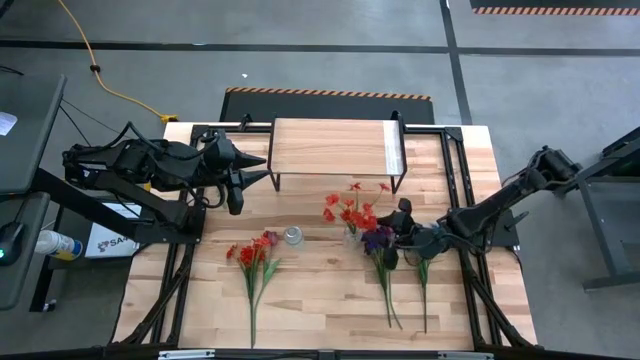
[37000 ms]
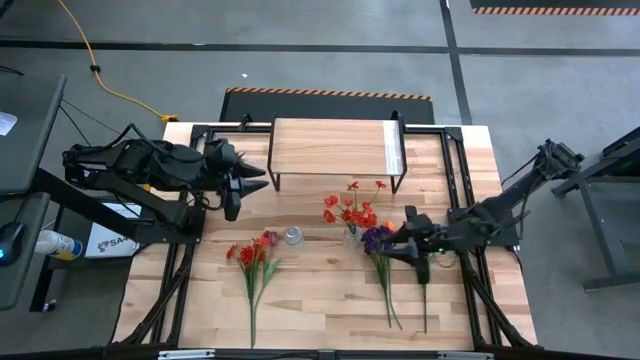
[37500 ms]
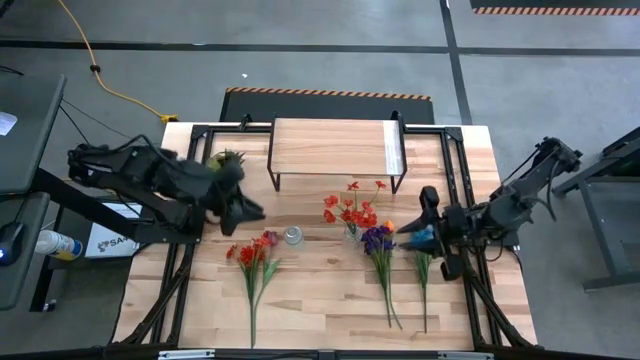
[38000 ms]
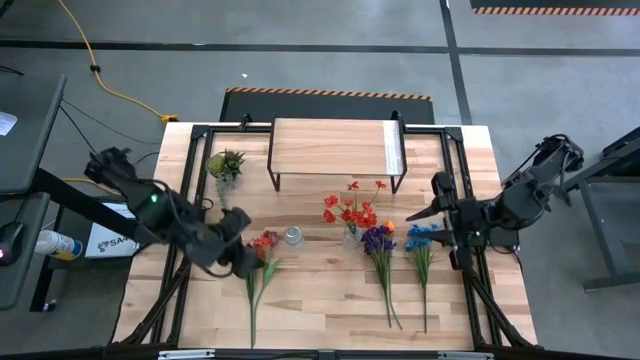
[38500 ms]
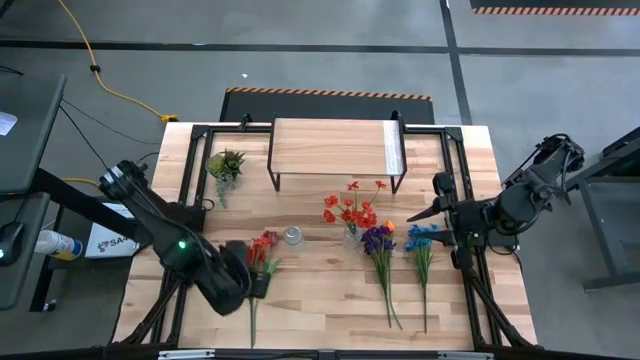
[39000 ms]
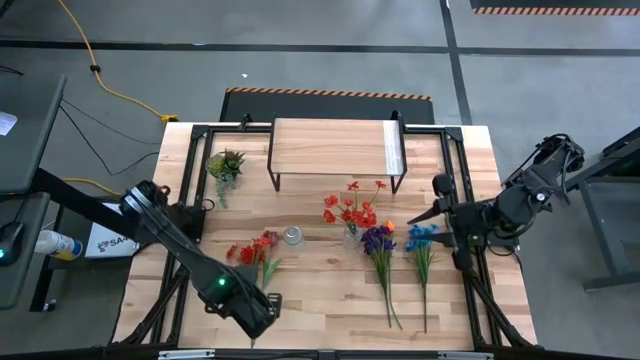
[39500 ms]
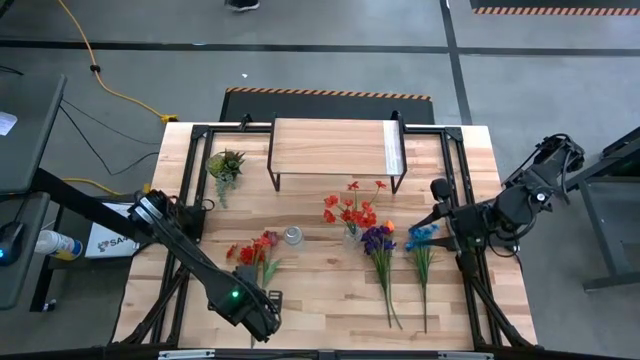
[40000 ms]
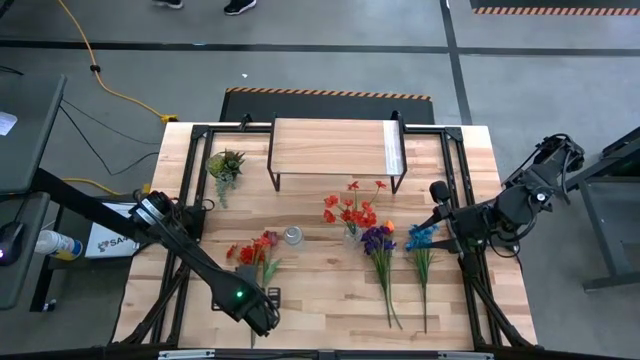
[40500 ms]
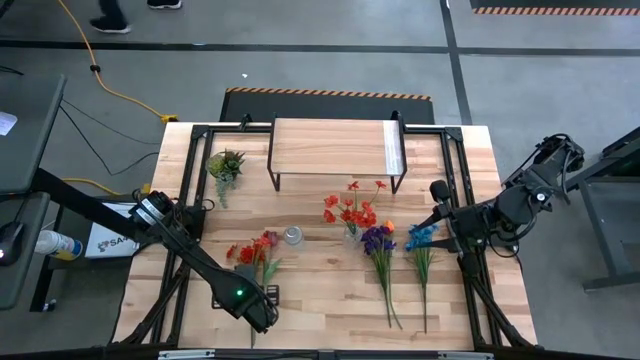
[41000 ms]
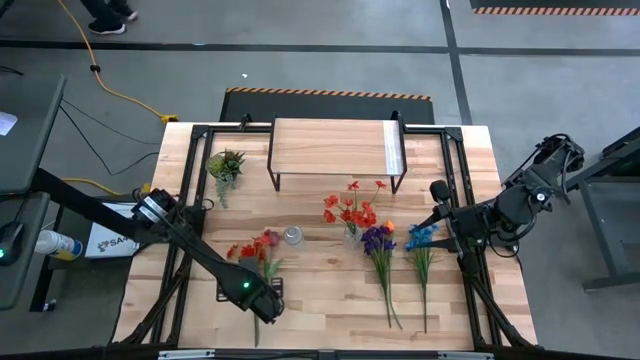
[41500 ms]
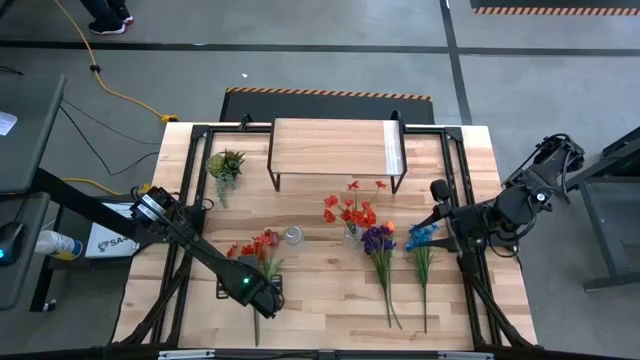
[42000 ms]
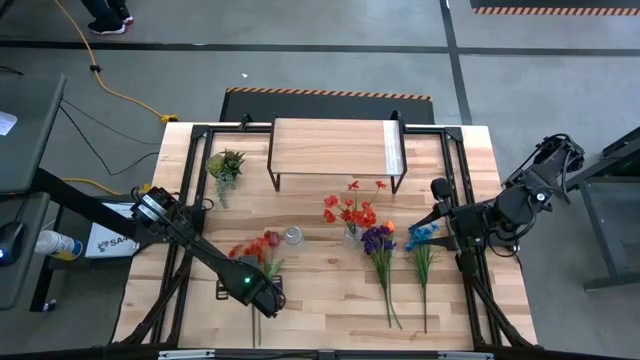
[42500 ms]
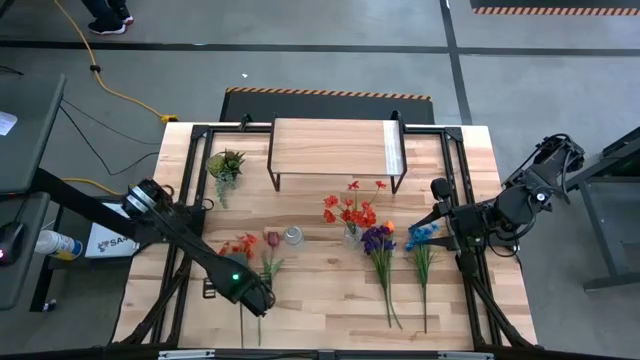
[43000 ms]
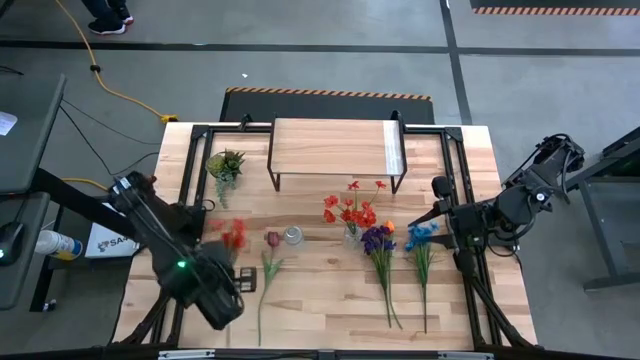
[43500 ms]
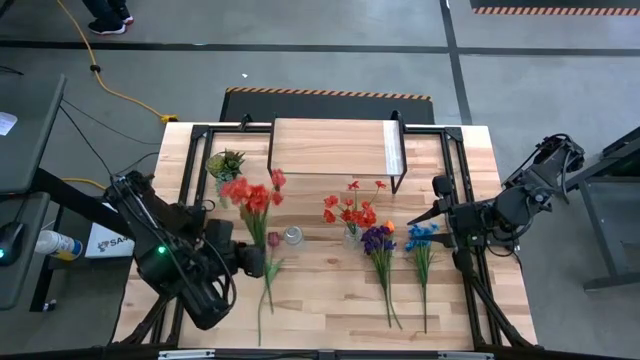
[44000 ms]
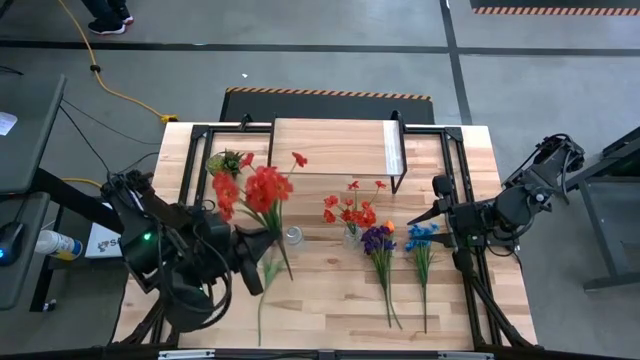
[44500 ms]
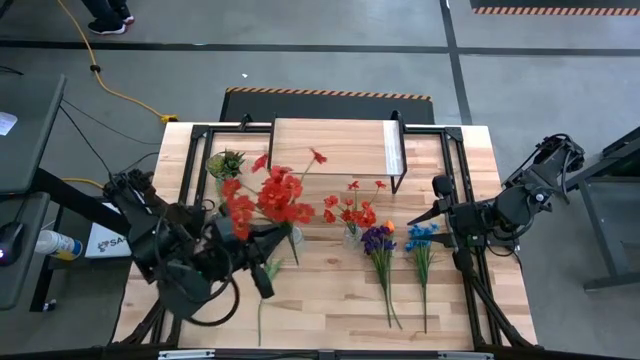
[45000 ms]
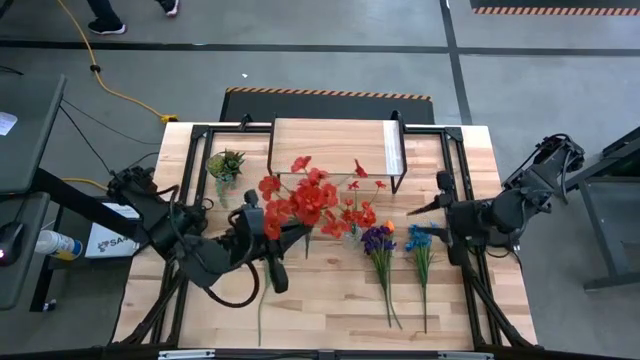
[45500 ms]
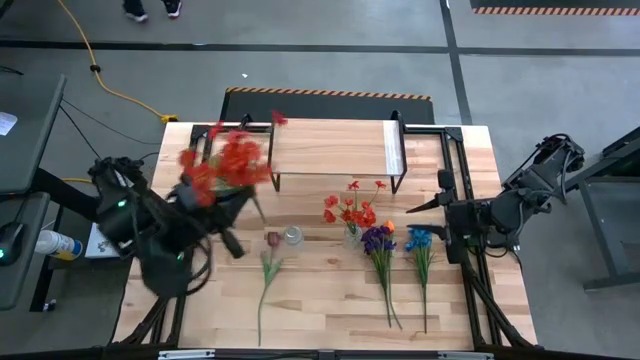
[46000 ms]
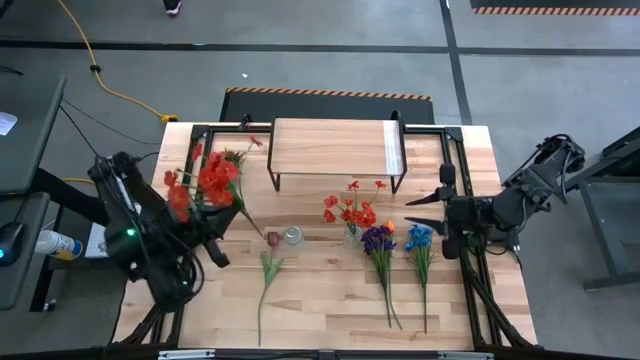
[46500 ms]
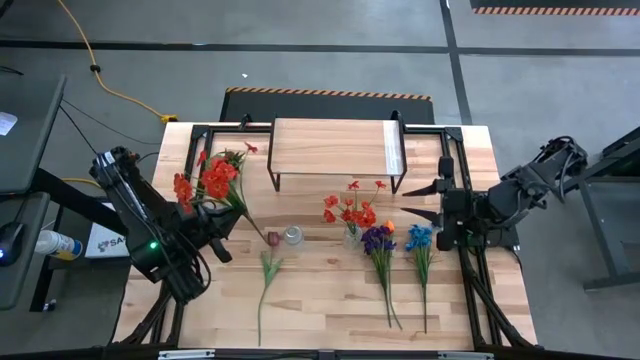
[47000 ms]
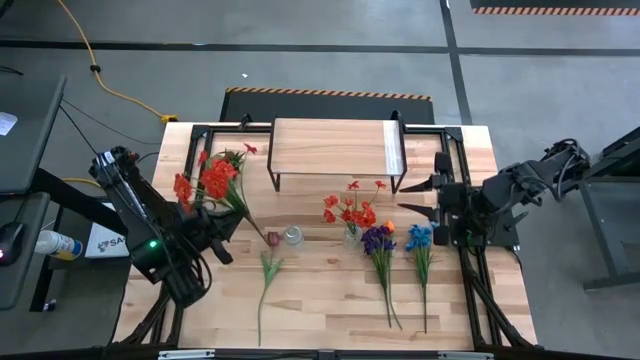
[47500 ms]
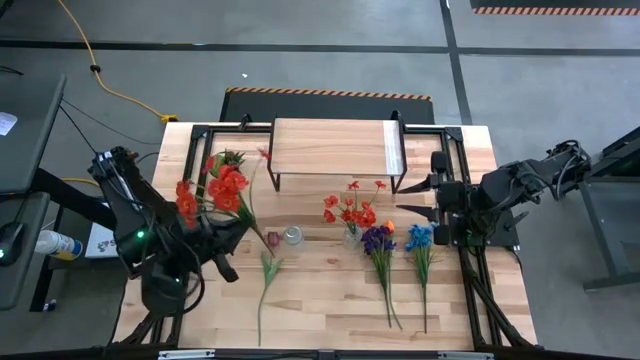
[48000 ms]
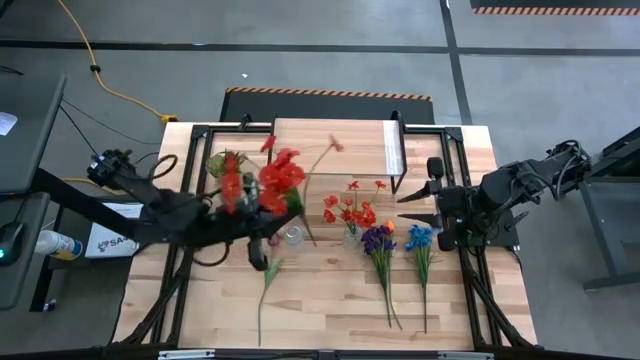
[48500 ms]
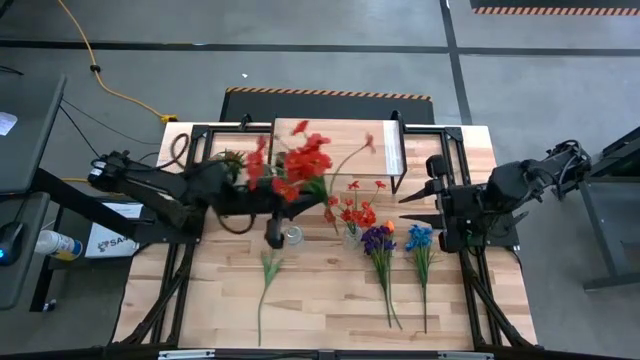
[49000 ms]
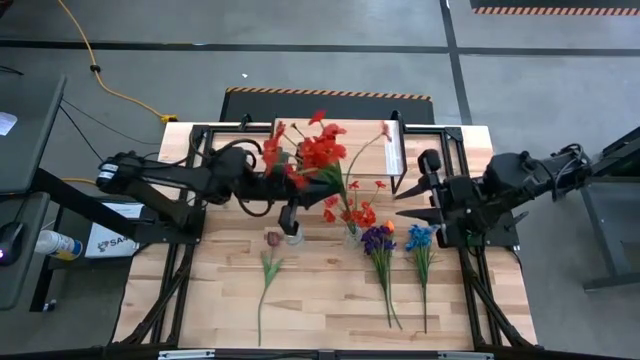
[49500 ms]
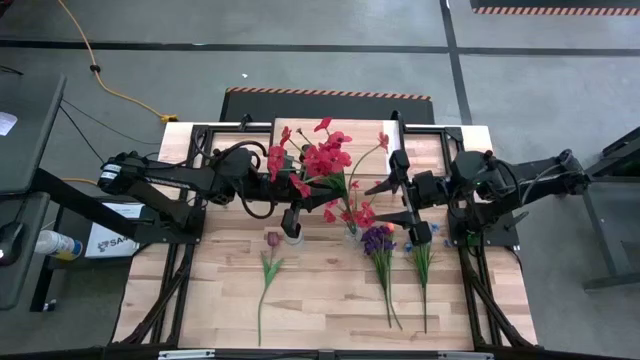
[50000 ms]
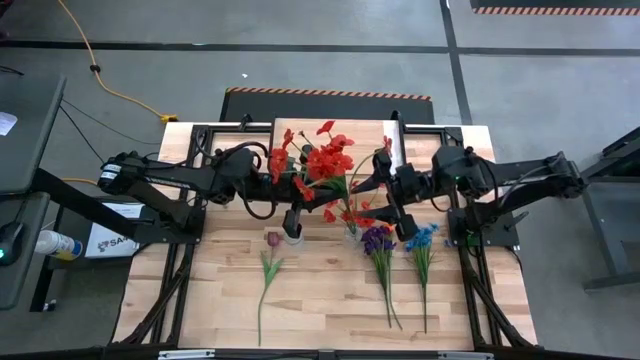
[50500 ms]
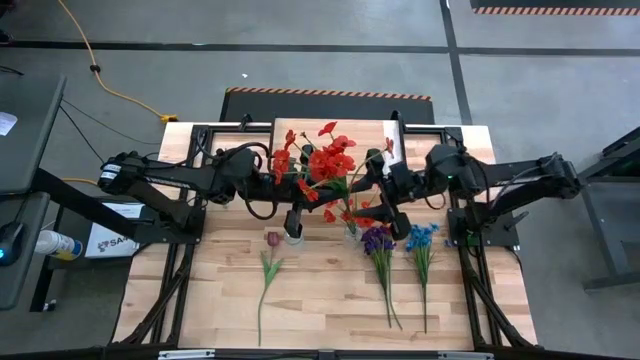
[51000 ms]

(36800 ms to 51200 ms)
Task: Pick and place flowers into a vace then onto a shelf
Put the orange flowers into the right transparent vase

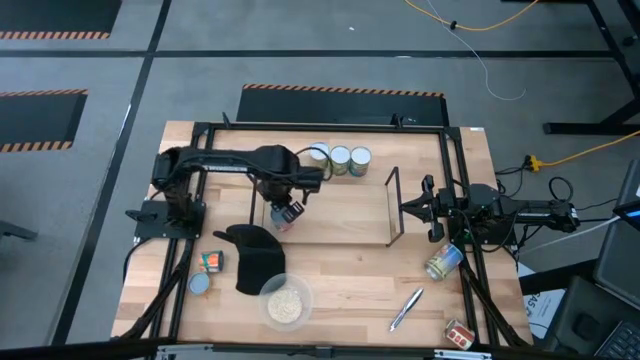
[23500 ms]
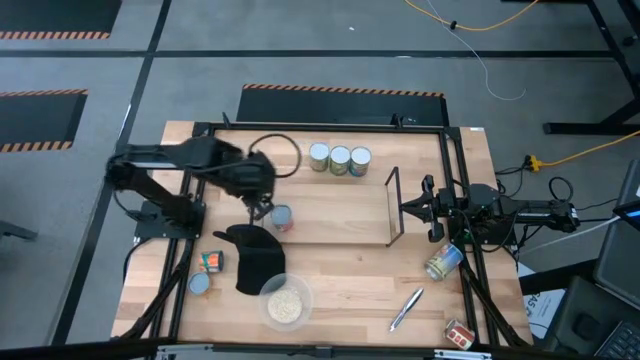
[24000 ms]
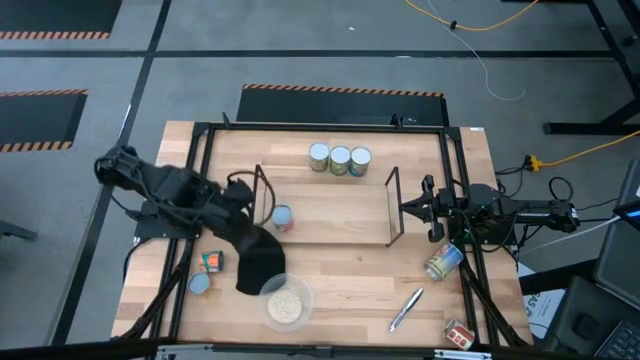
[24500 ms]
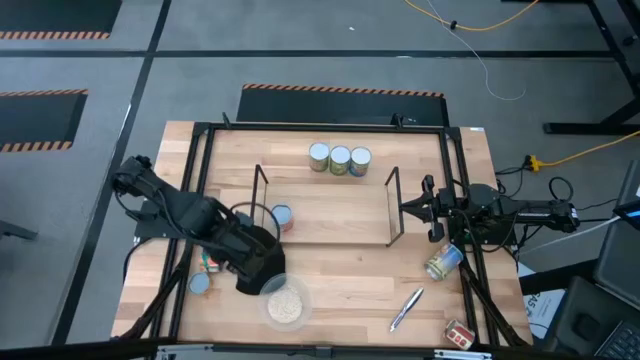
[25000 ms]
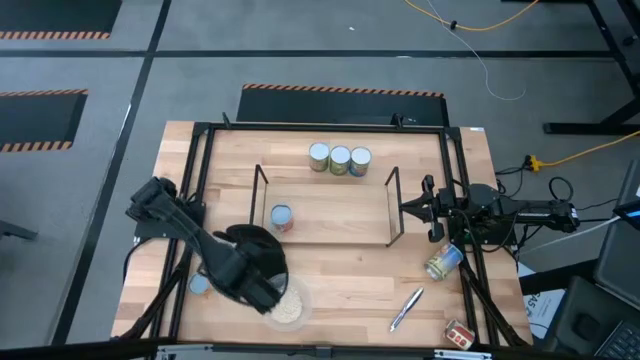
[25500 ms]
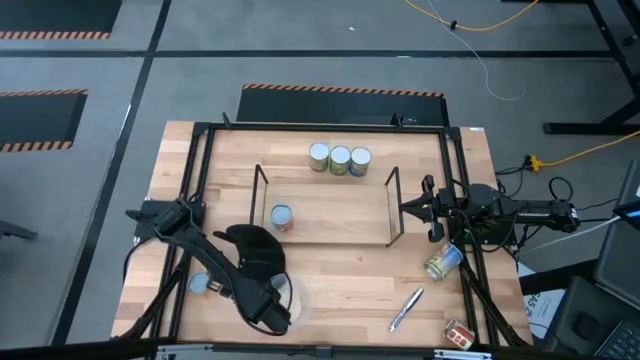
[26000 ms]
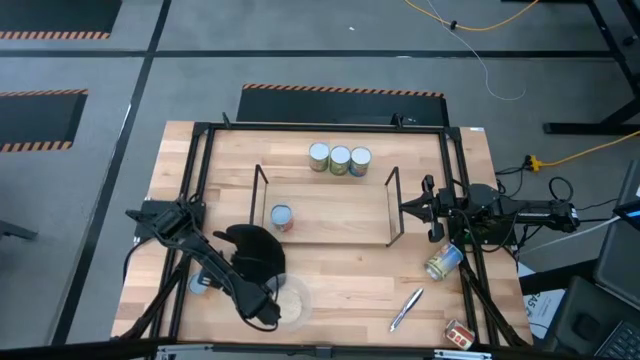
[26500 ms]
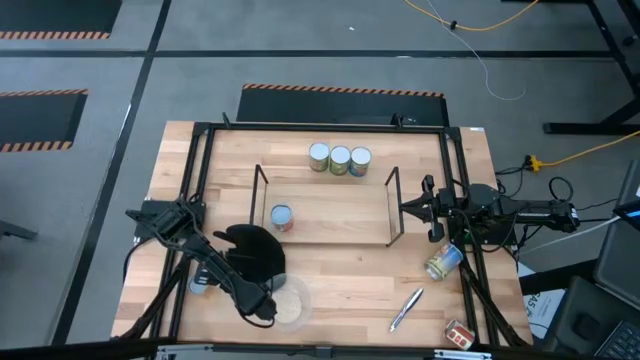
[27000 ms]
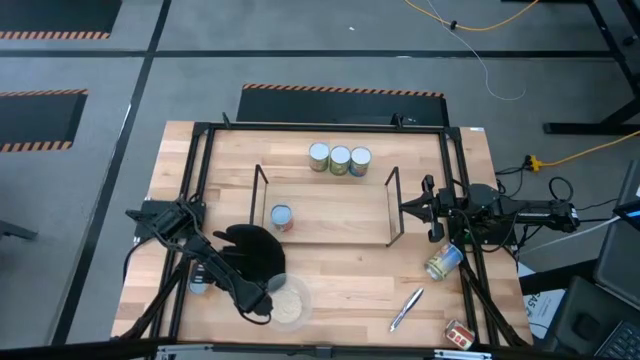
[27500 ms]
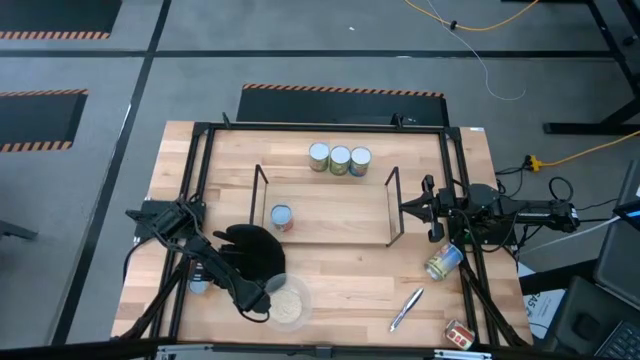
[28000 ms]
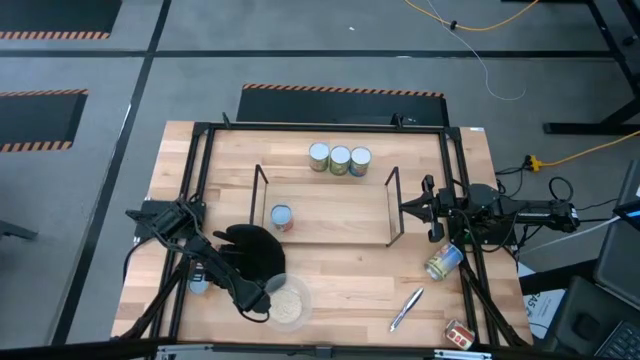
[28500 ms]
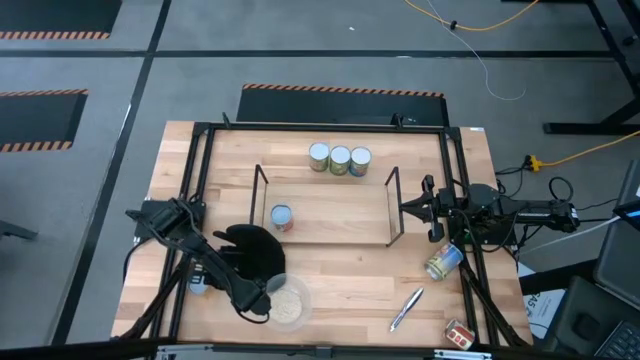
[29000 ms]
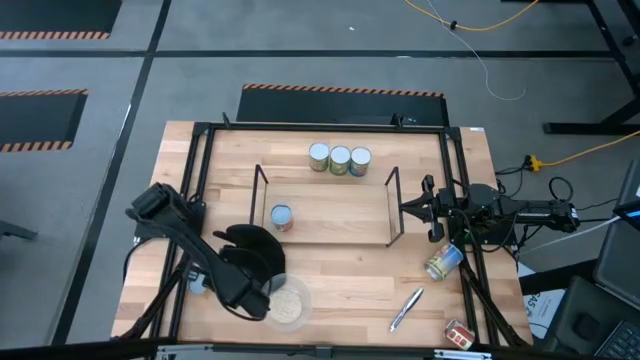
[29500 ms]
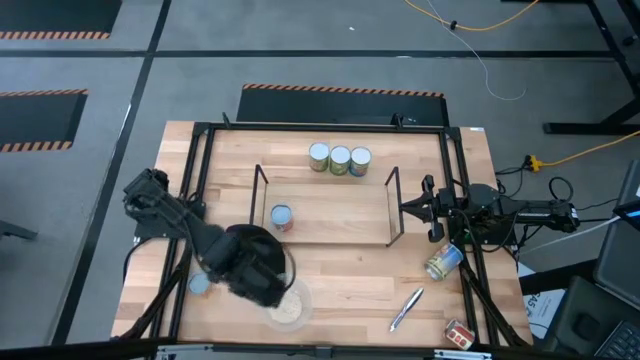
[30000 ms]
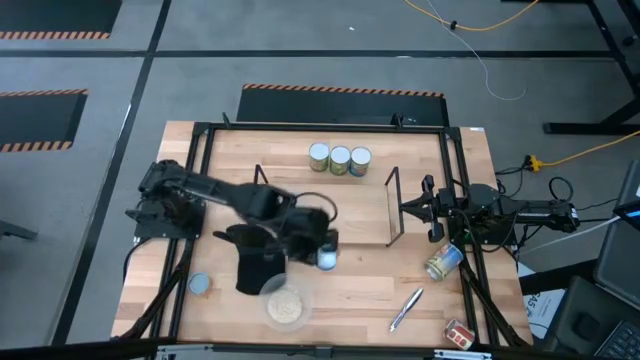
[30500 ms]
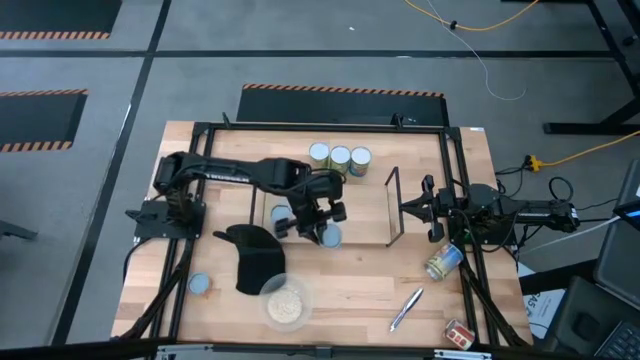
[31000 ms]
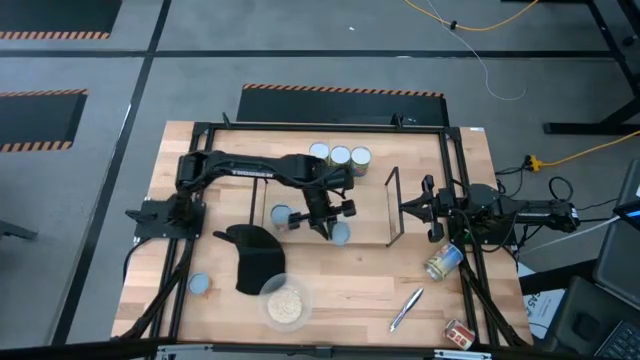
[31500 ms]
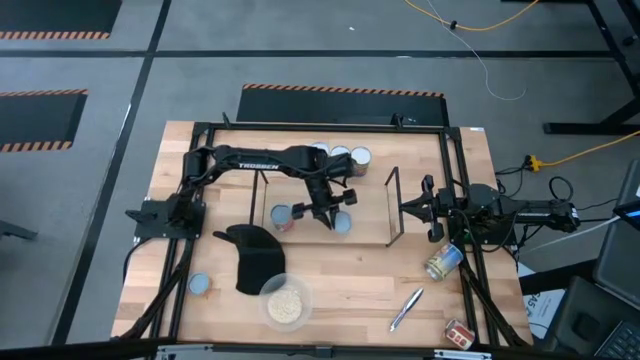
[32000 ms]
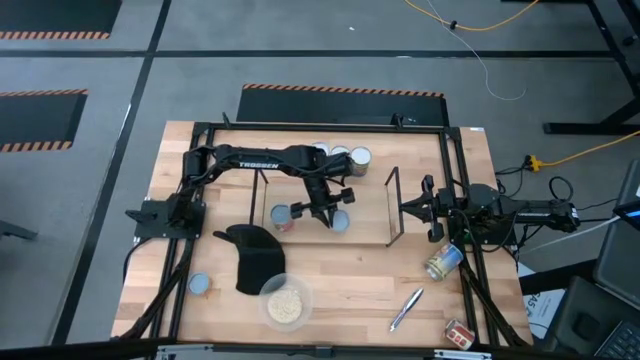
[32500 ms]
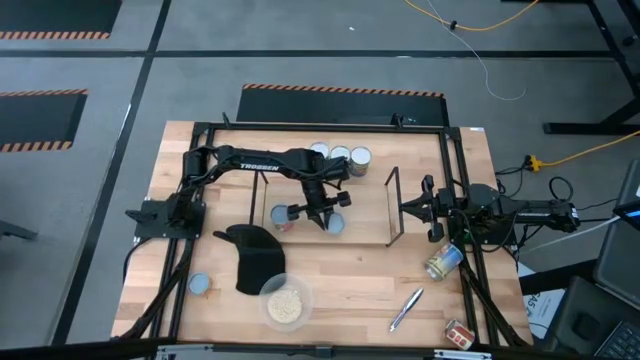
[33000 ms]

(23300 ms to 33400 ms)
Task: Pick and place cans onto a shelf
Put the small canned oranges on the shelf
